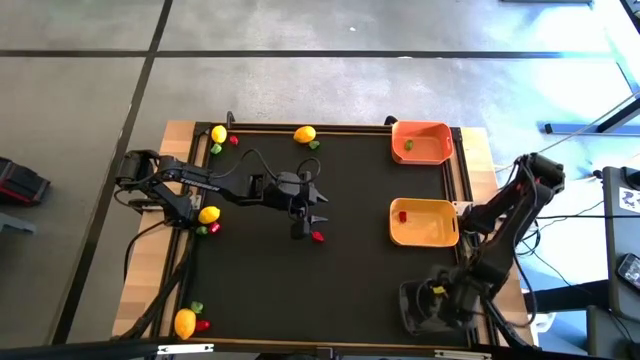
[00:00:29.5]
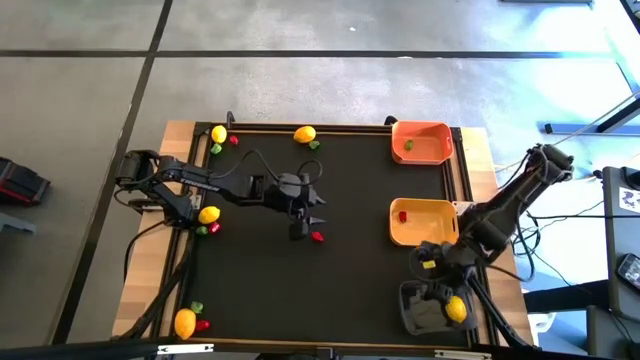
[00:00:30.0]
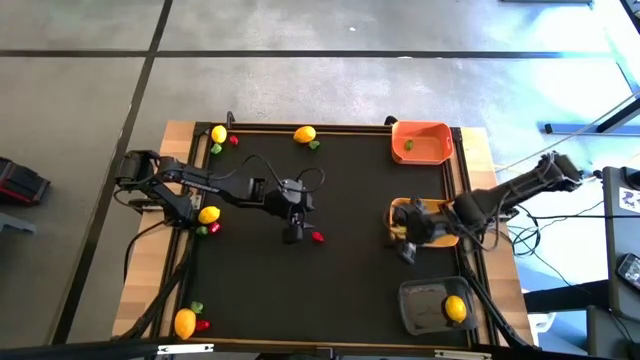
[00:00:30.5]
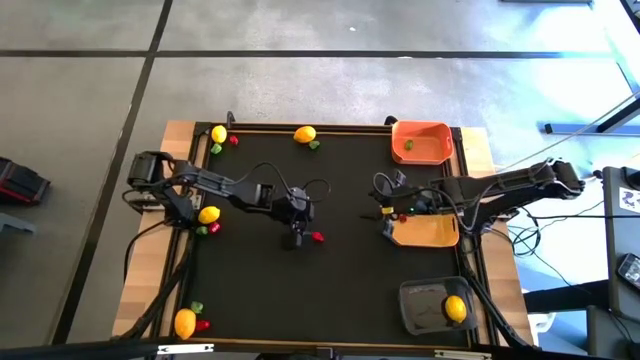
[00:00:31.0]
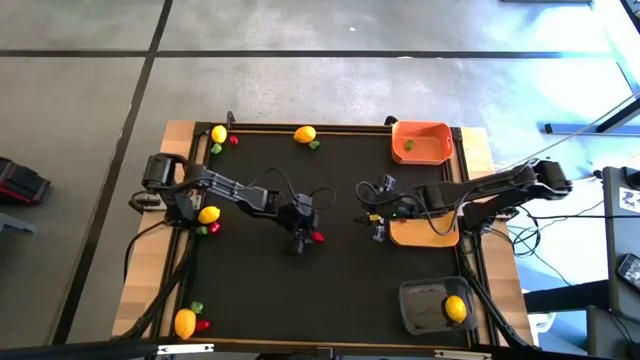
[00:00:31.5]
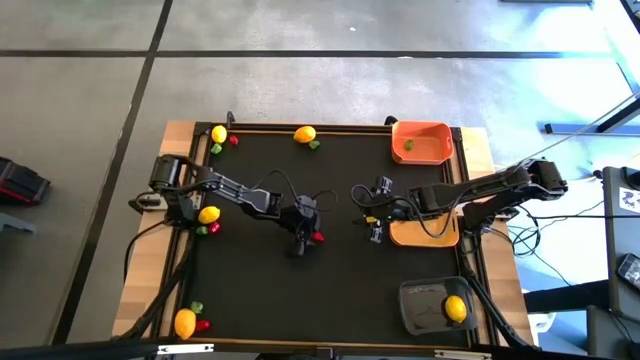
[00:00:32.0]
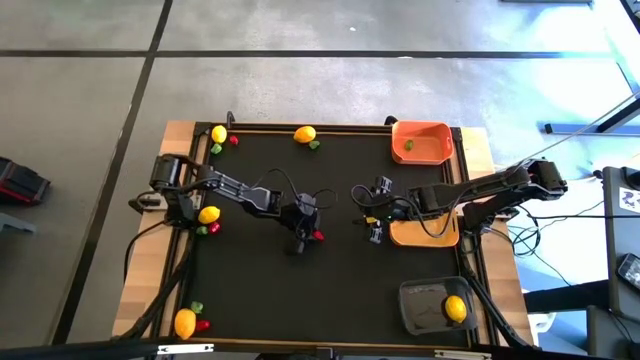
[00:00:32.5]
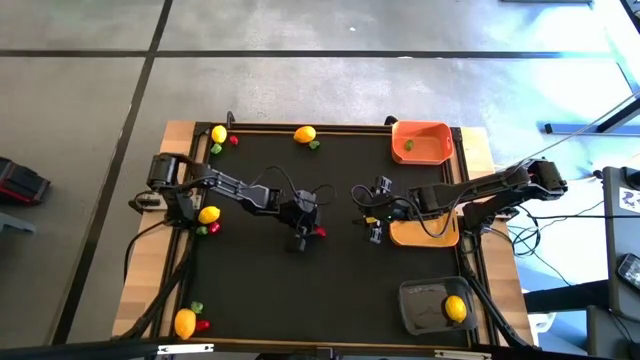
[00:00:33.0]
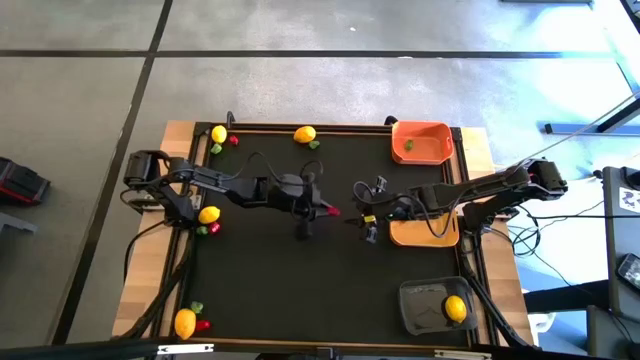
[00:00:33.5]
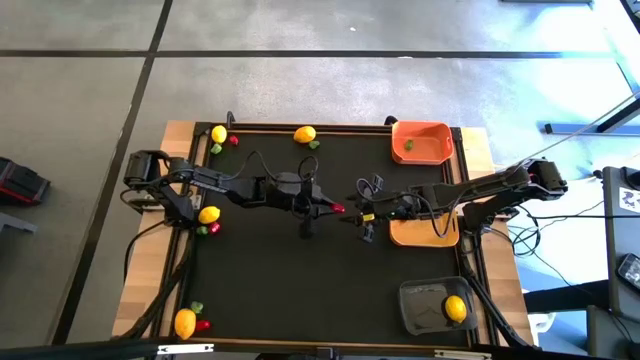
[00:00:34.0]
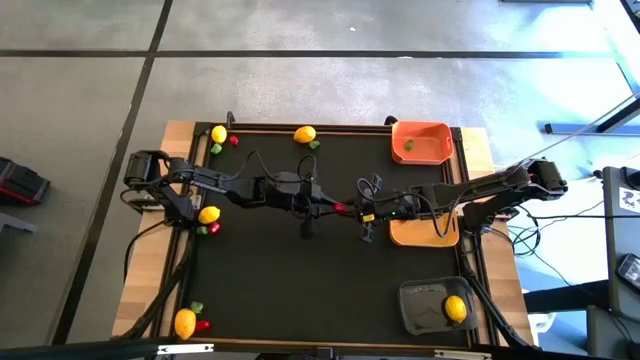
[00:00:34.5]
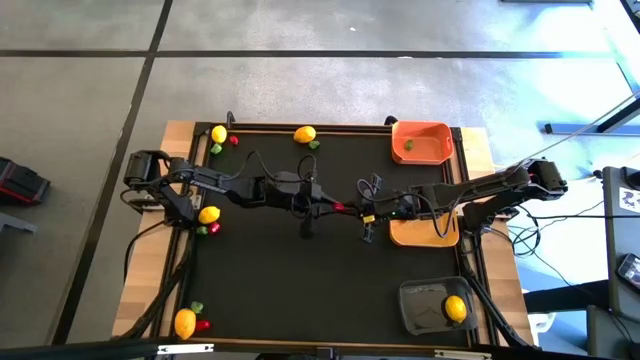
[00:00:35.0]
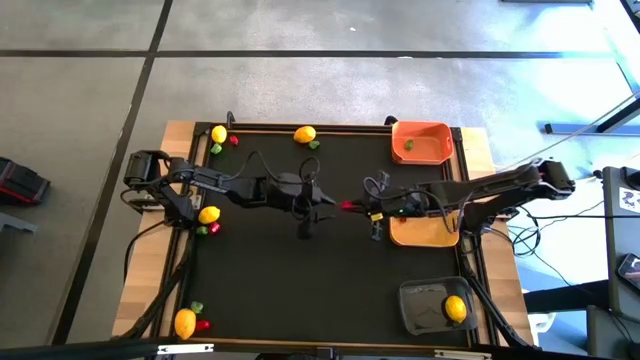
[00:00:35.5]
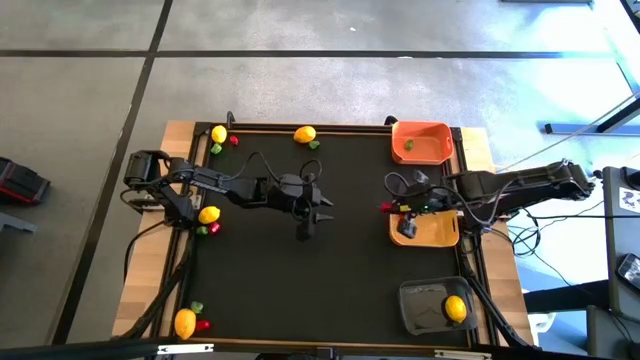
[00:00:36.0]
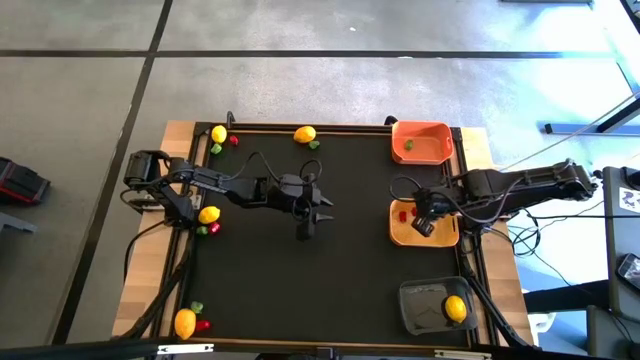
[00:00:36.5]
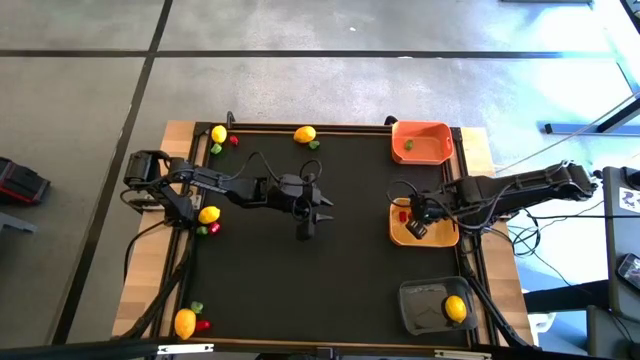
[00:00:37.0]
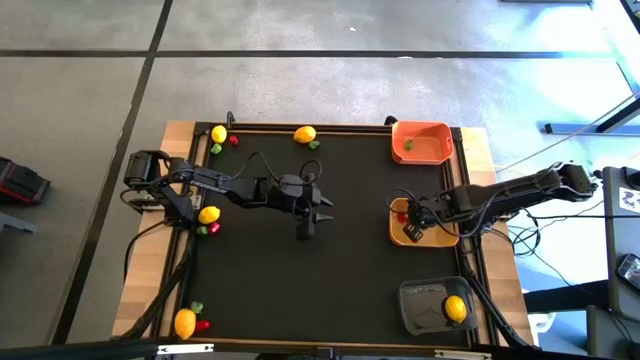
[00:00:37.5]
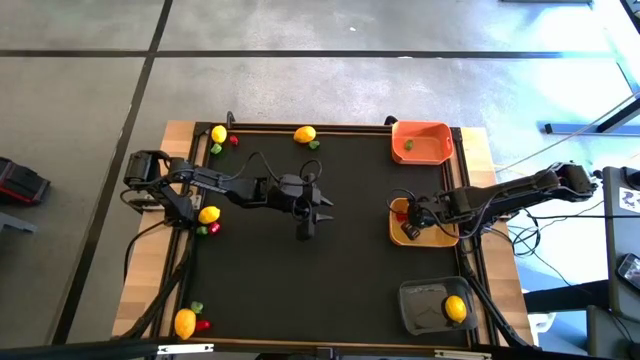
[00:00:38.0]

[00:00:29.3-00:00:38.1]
Task: Sort produce into baskets
Put the middle right red chili pepper into the yellow bin

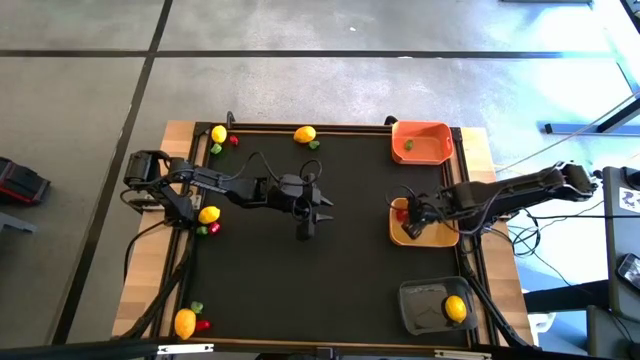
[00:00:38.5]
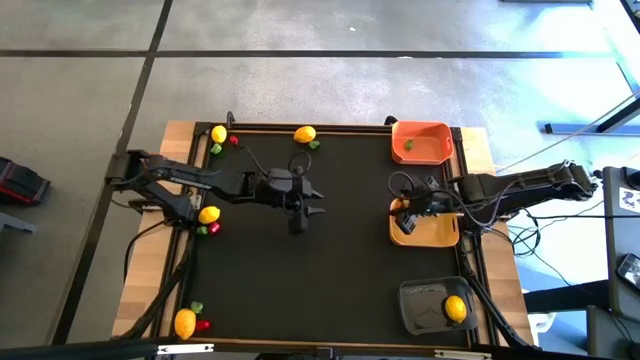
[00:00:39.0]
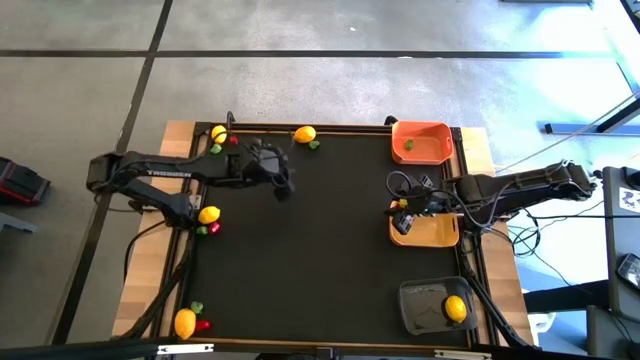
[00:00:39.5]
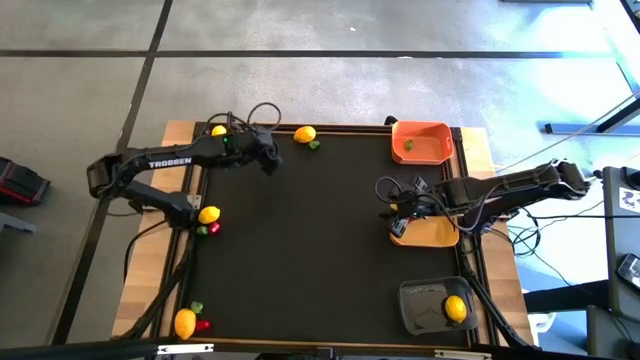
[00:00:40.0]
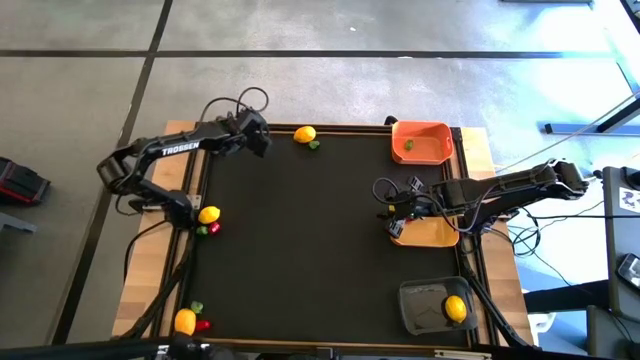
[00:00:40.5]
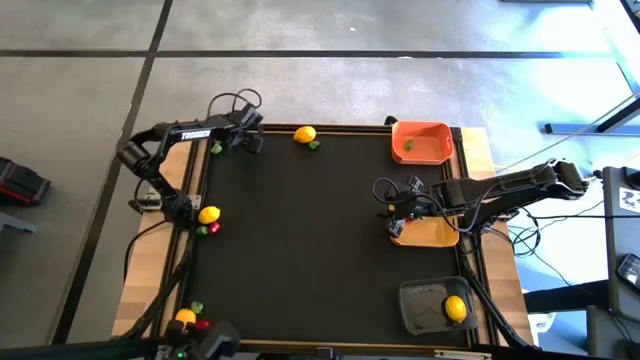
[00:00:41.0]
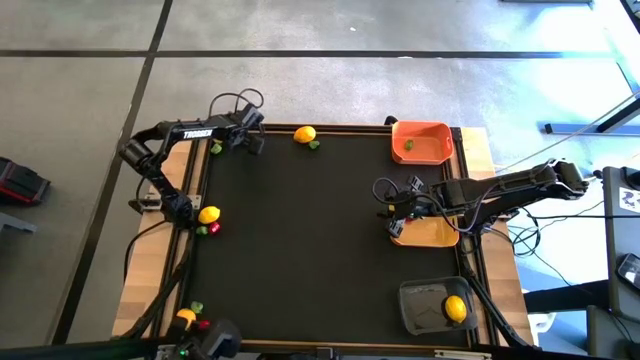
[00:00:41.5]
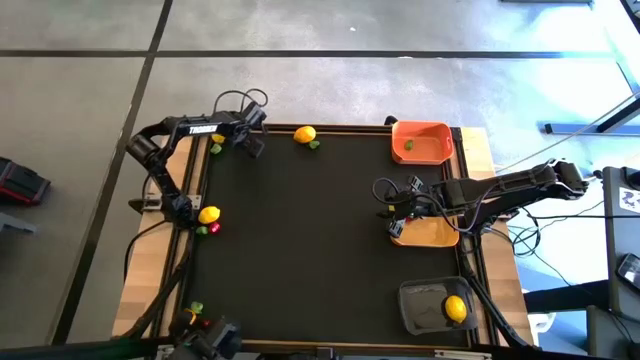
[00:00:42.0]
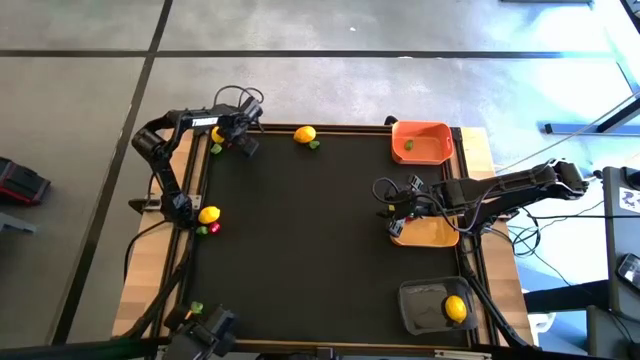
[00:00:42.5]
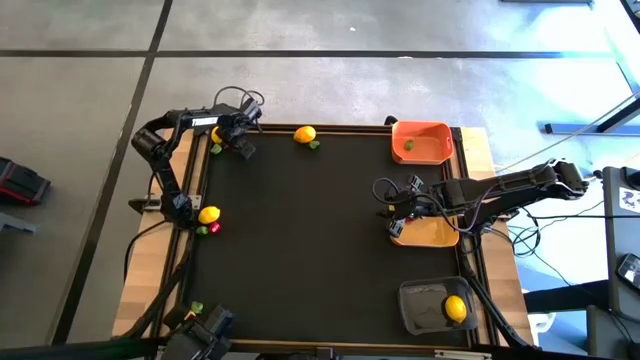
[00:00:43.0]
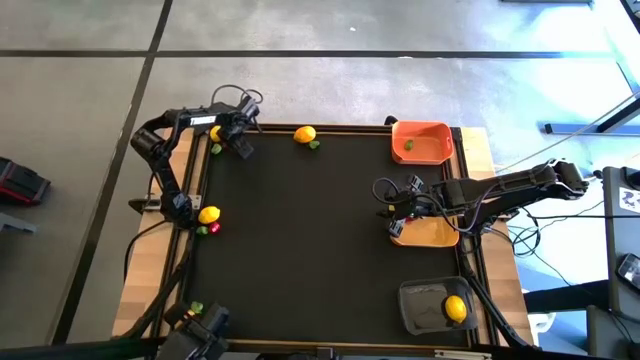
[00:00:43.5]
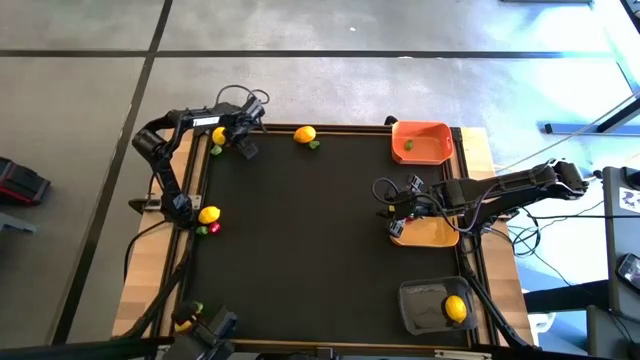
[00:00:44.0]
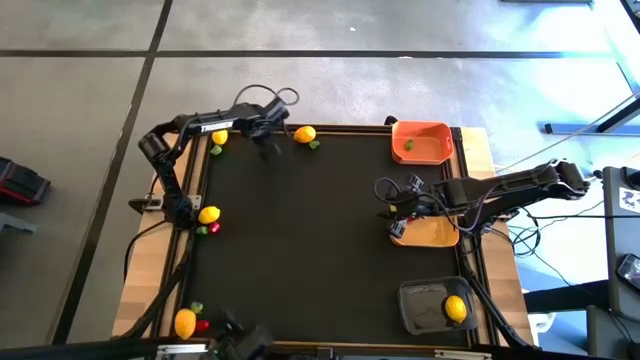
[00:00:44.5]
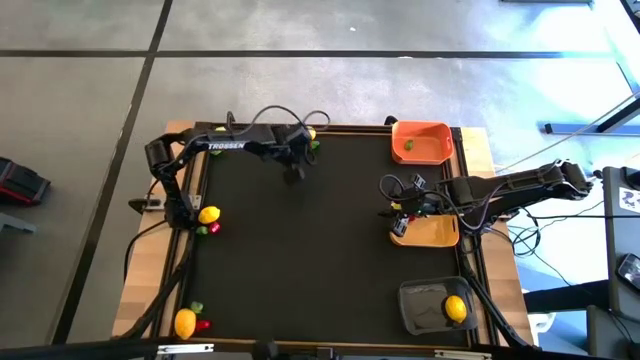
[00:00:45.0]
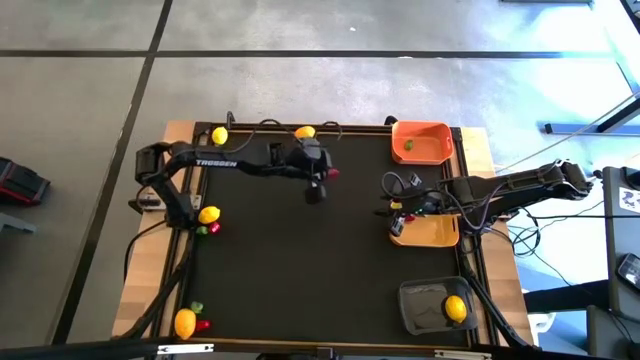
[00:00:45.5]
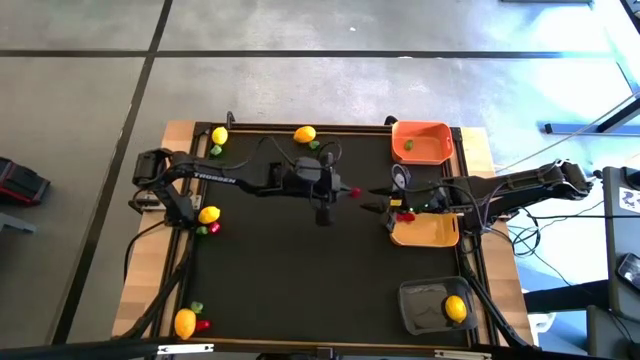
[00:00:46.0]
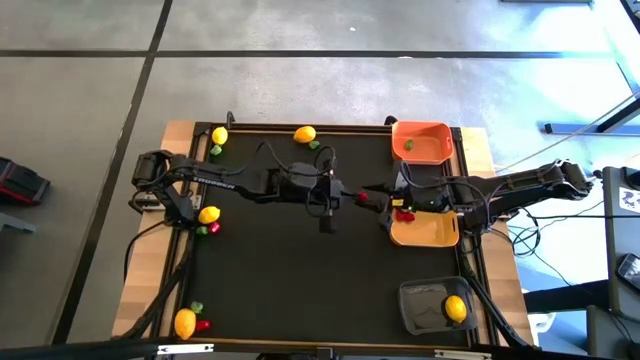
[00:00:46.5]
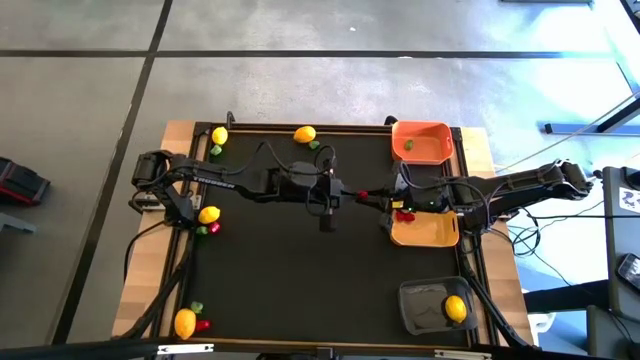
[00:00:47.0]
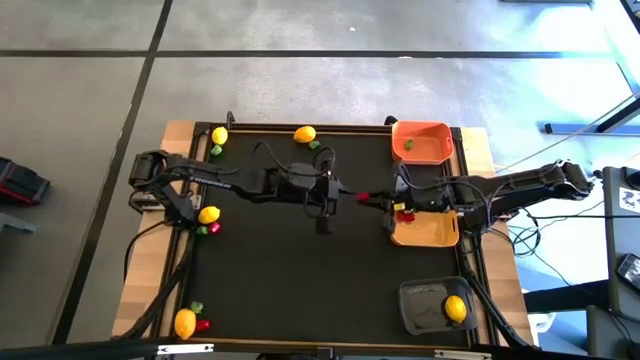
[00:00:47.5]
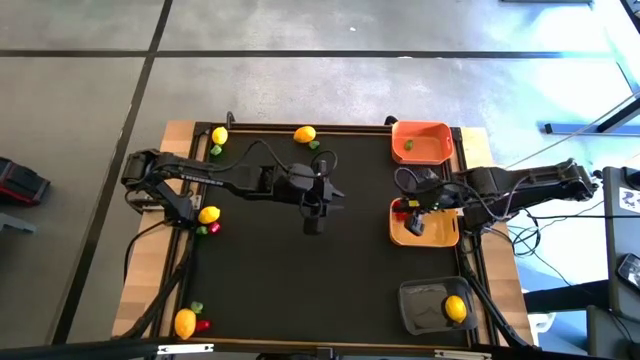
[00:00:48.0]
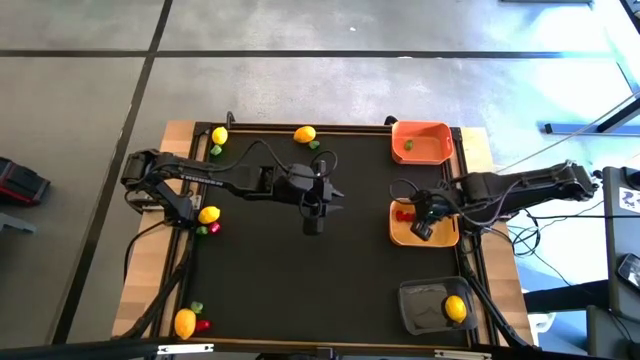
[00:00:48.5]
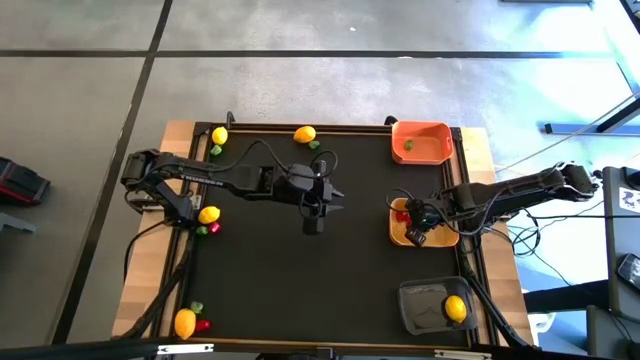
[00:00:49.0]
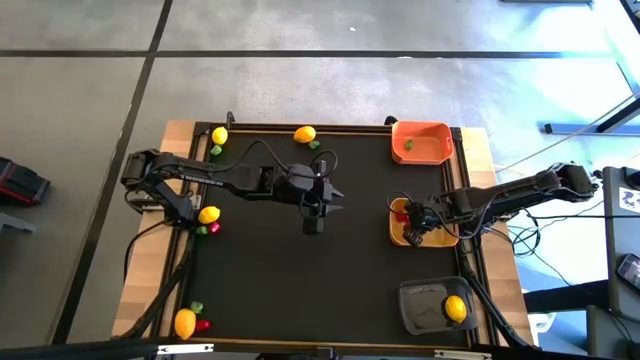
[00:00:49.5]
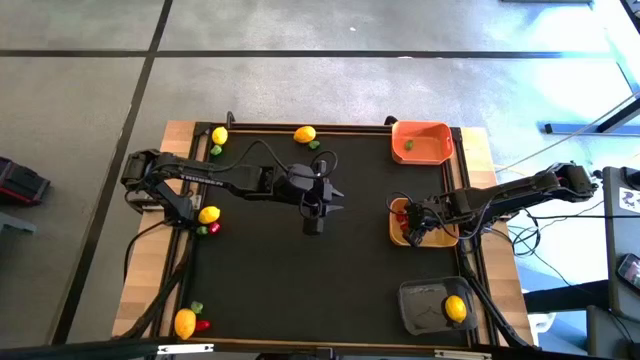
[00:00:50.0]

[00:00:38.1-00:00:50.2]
Put the top red chili pepper into the yellow bin
